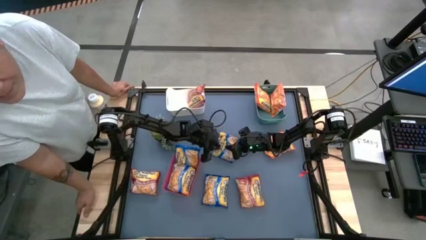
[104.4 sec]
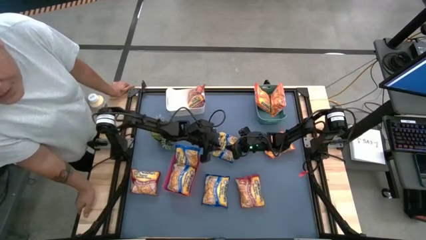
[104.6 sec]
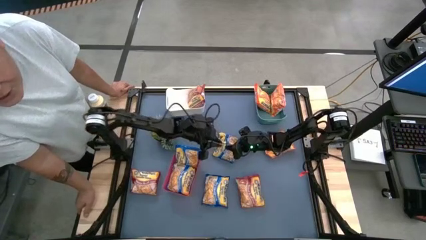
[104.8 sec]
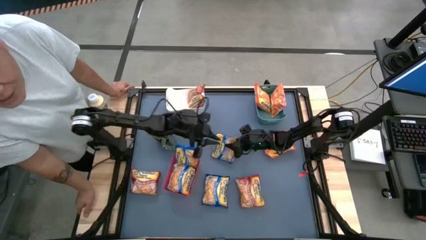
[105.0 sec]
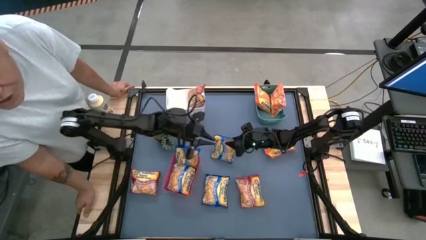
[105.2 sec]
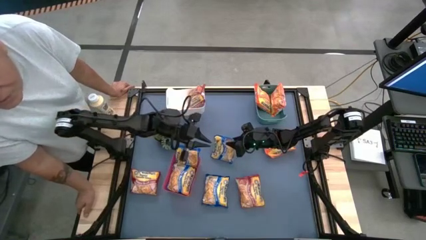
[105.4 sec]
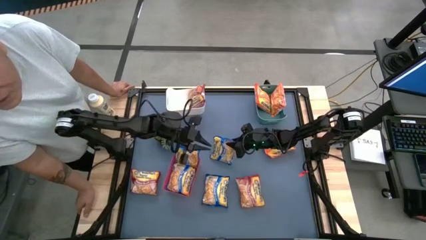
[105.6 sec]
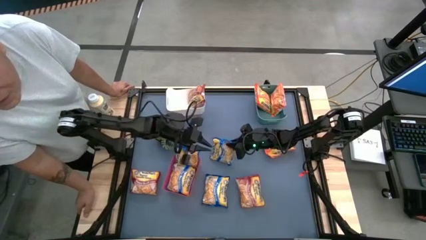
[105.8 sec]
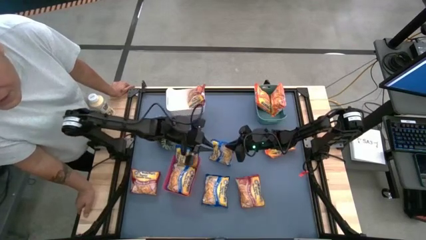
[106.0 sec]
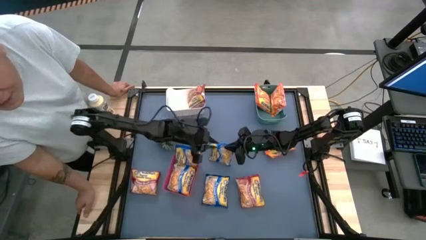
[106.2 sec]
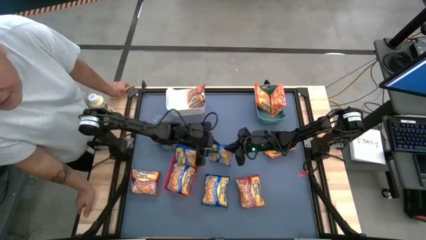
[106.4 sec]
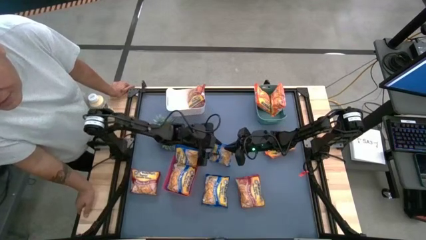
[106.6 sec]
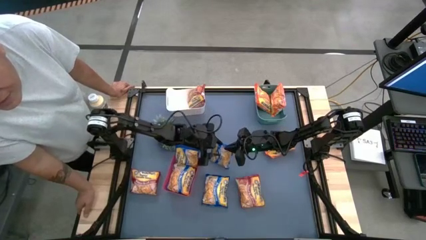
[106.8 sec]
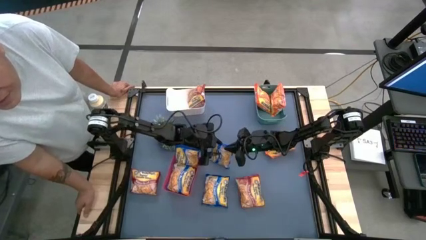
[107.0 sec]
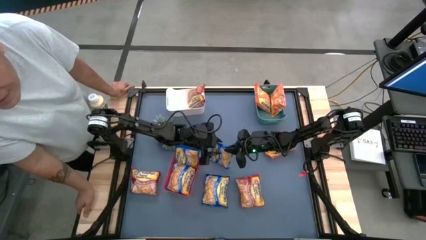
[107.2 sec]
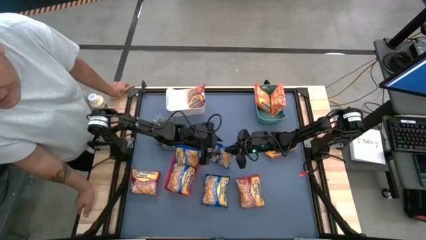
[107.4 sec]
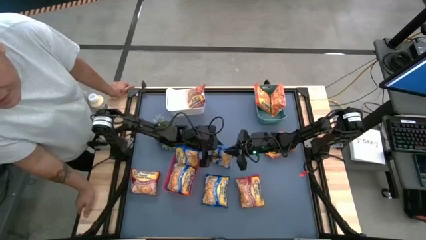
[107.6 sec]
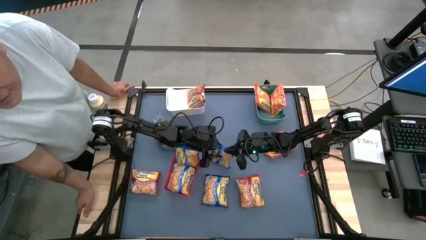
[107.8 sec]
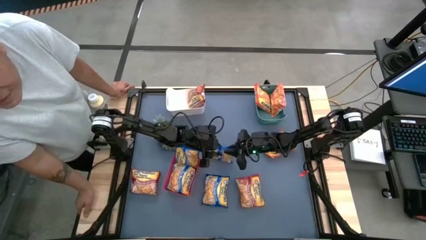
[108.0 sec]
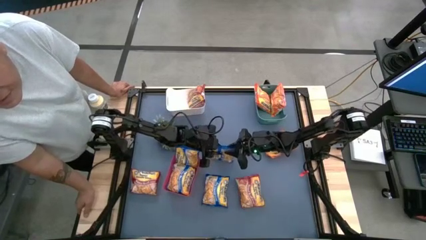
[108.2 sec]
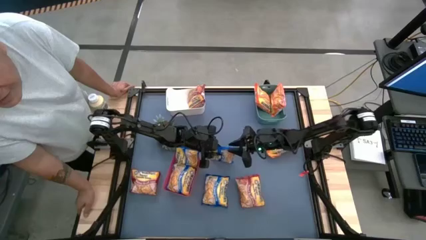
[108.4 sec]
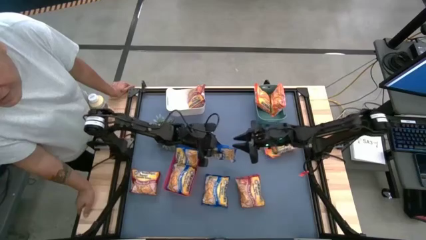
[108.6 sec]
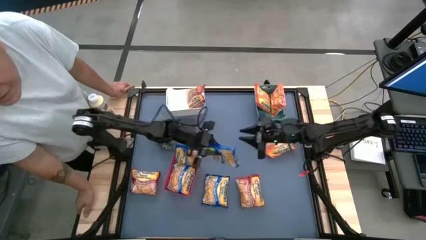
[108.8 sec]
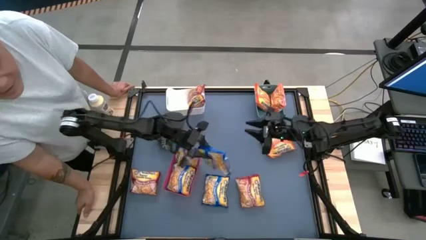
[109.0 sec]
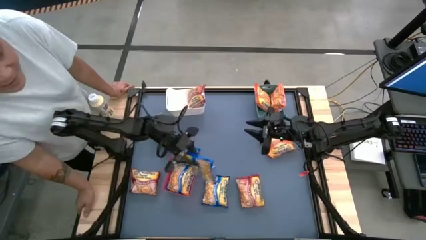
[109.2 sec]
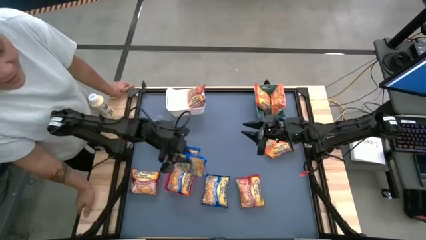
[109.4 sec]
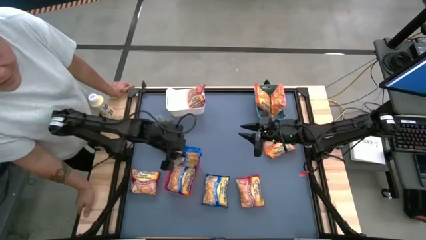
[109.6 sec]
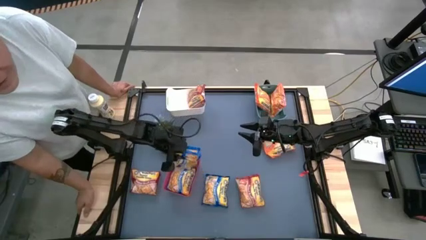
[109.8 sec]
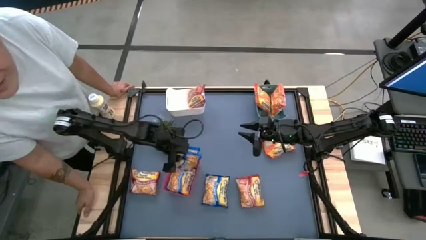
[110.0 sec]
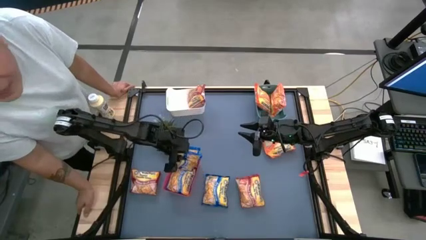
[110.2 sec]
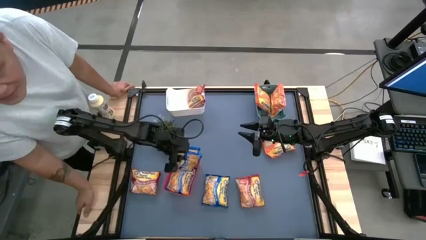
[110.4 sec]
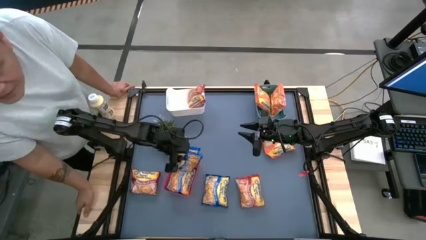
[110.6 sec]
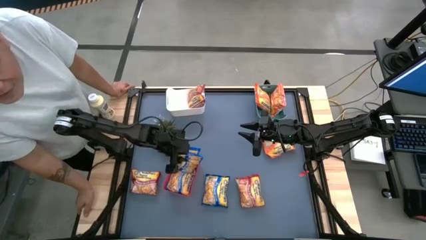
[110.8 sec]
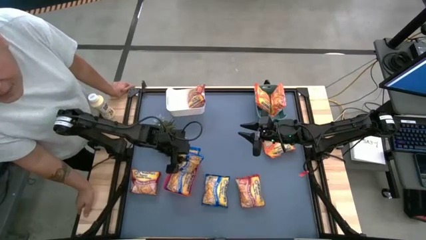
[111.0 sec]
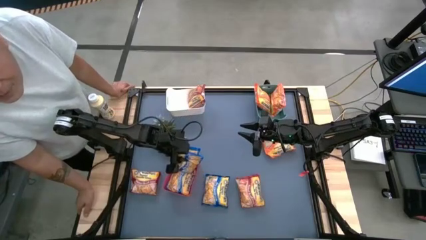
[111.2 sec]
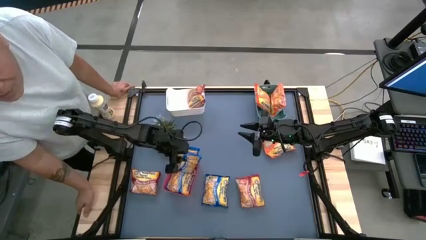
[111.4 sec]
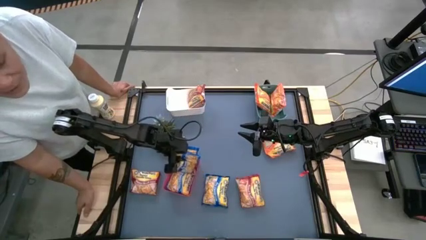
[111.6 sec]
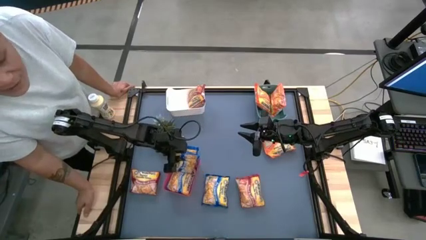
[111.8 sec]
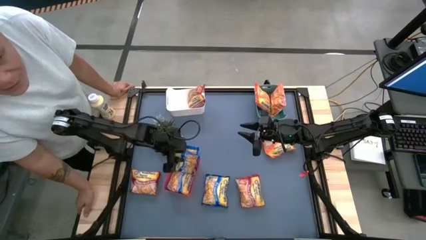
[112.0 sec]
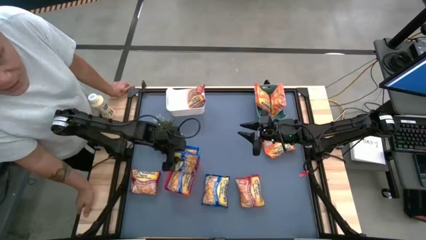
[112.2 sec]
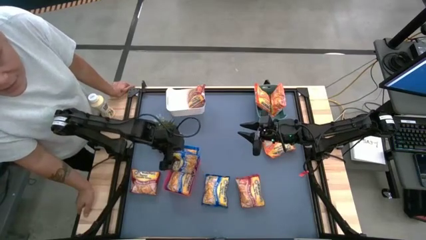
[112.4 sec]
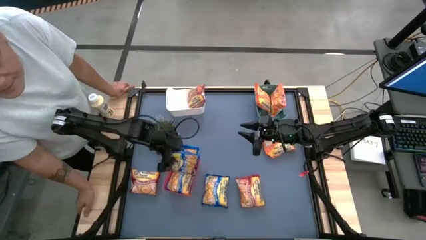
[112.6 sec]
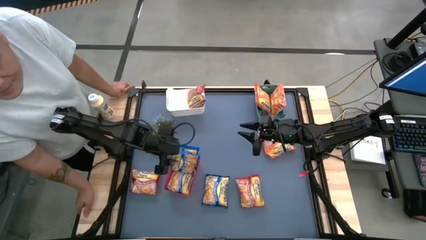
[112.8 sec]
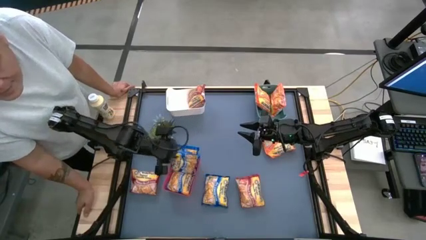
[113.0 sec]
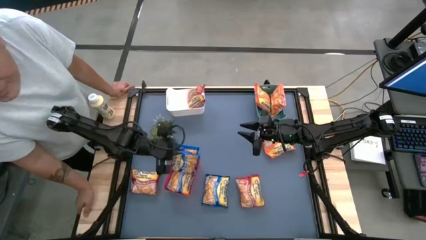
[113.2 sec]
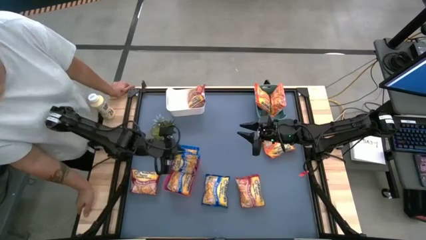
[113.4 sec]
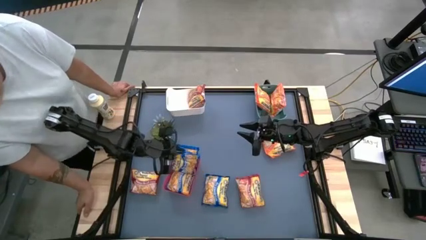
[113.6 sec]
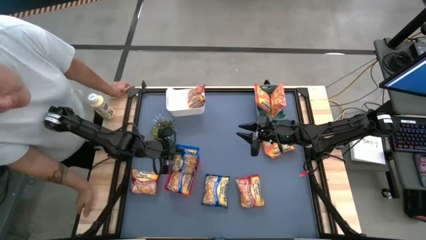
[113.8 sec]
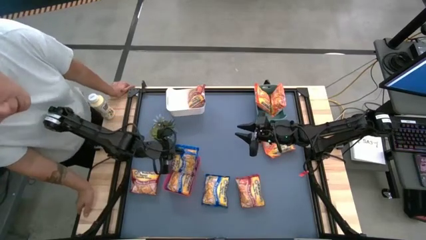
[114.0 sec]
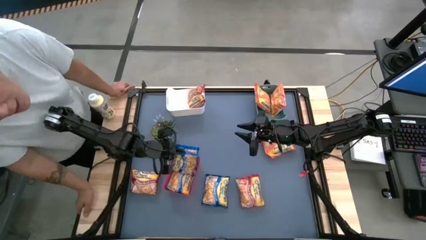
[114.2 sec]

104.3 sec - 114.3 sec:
Task: Sort Maruchan noodles
Put the top blue noodle pack into the red bin

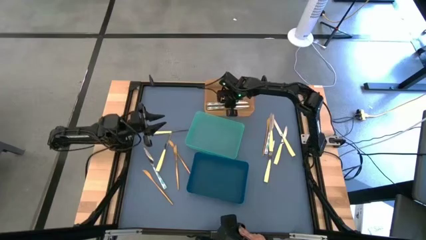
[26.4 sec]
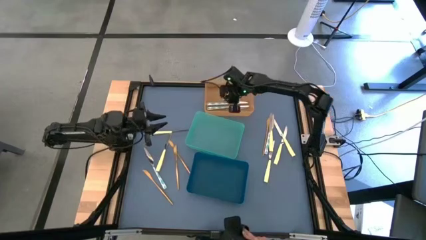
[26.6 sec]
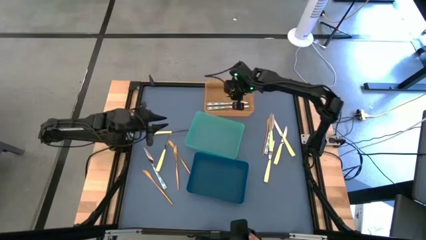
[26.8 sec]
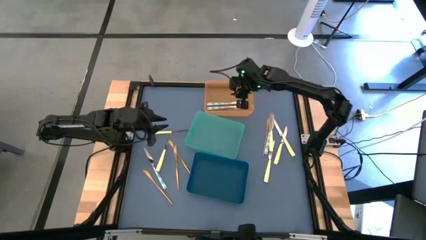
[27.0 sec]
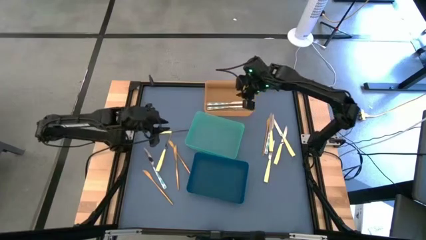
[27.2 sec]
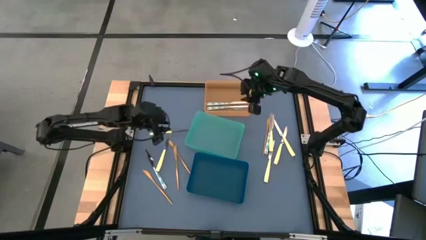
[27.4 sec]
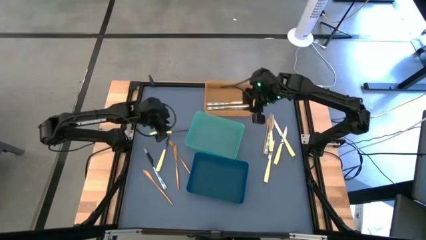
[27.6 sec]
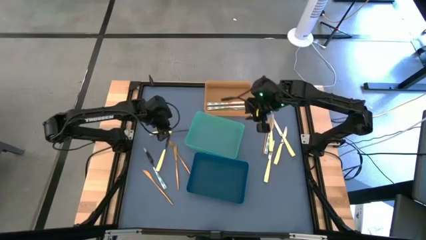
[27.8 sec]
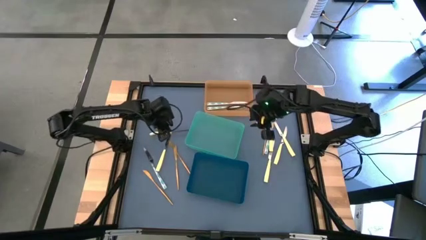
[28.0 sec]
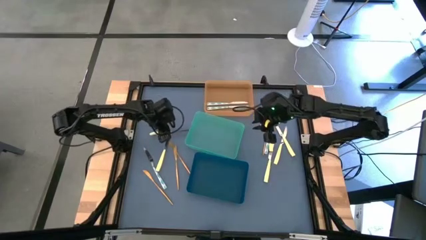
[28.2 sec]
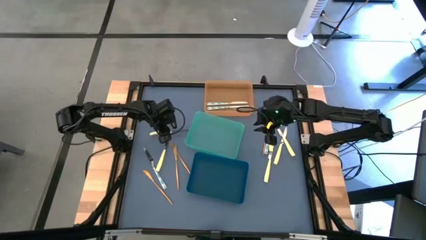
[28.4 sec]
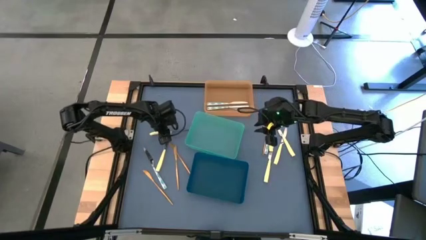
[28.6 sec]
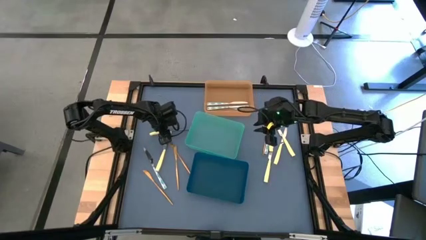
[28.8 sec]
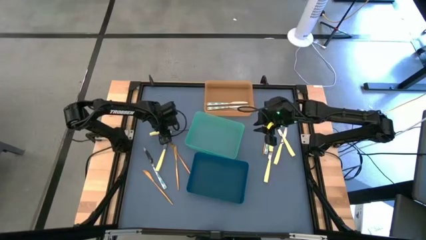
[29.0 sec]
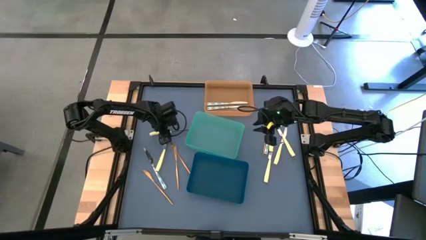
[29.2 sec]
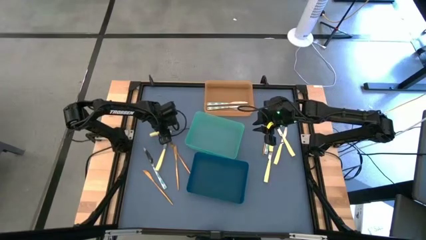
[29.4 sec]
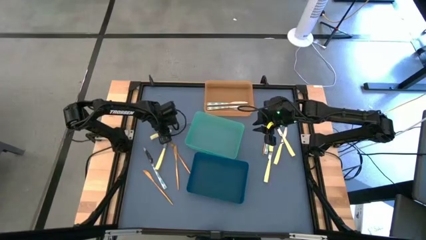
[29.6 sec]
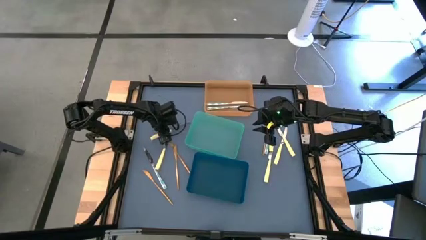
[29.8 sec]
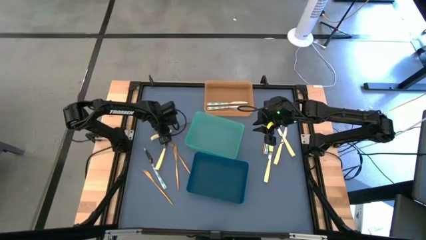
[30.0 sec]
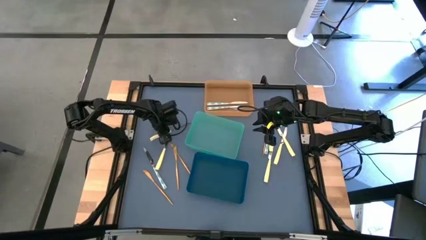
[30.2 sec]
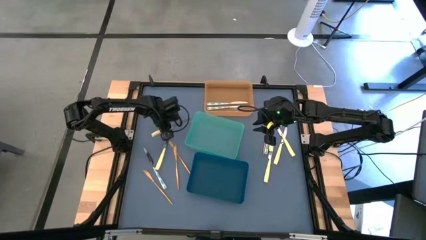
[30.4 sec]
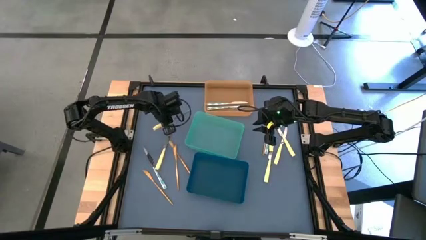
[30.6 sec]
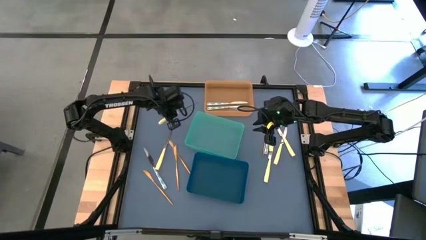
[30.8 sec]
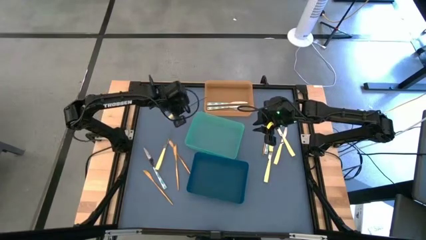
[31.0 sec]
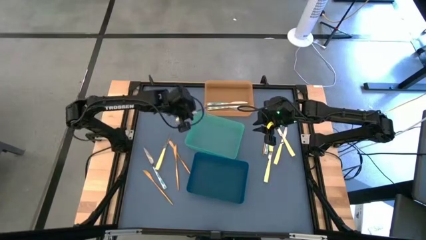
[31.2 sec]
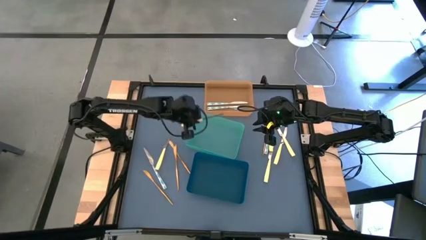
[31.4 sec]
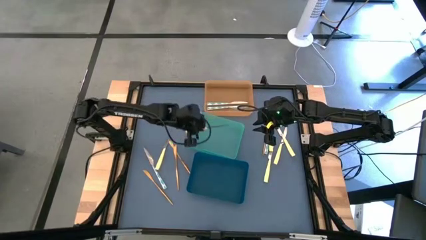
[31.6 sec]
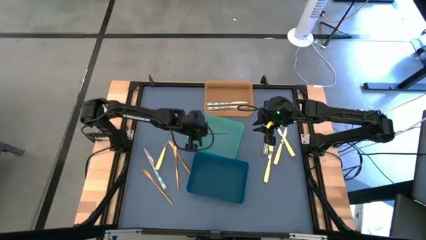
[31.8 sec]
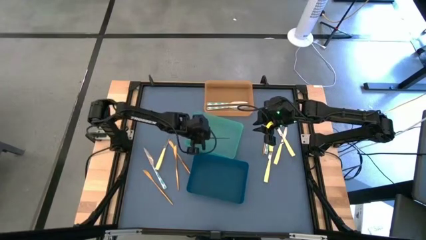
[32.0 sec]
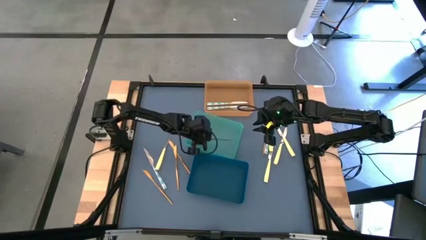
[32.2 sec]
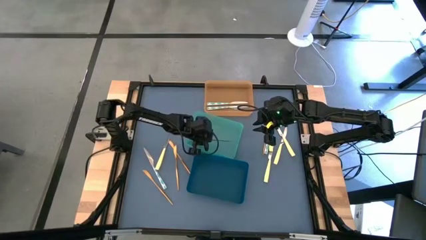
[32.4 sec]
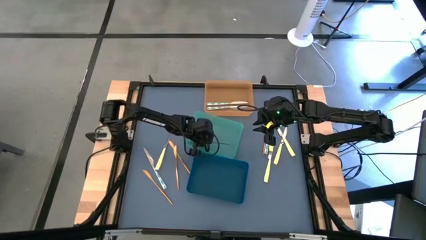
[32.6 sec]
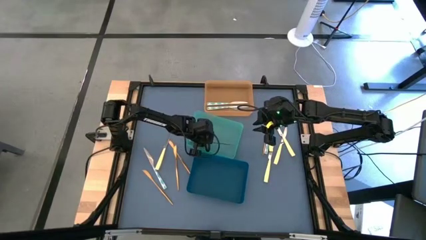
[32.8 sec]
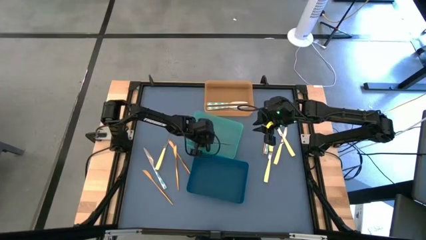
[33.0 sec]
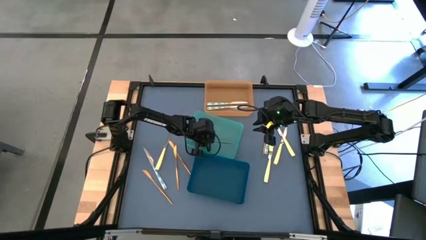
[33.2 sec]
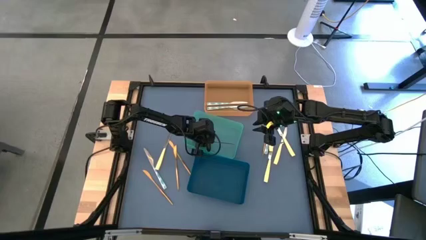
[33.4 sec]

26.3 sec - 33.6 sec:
Task: Sort silverware by color (type)
Put the yellow knife into the green bin
